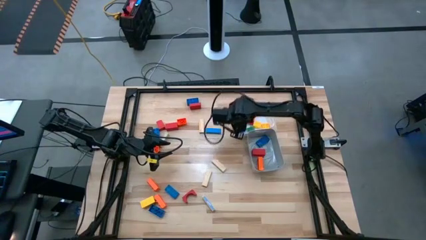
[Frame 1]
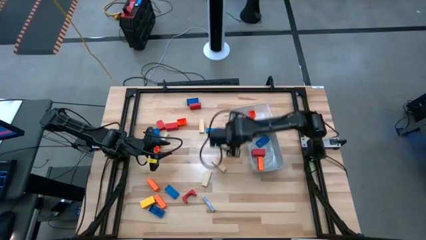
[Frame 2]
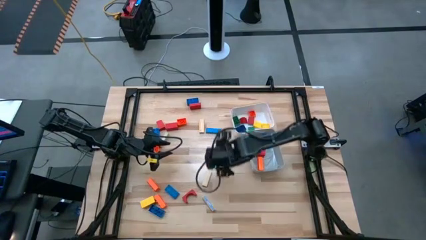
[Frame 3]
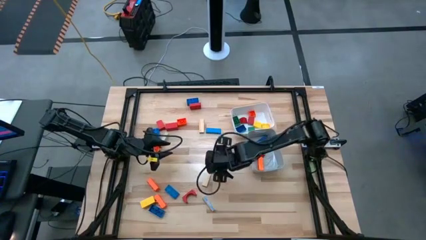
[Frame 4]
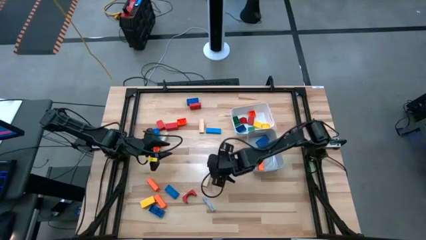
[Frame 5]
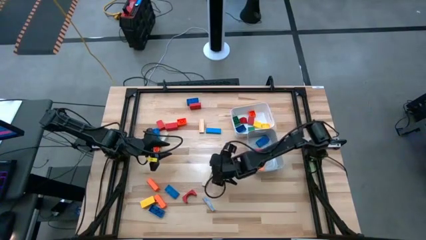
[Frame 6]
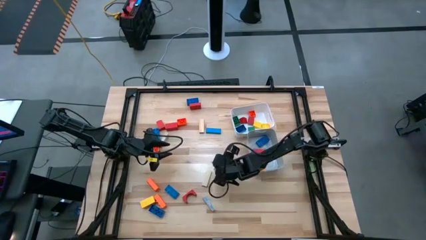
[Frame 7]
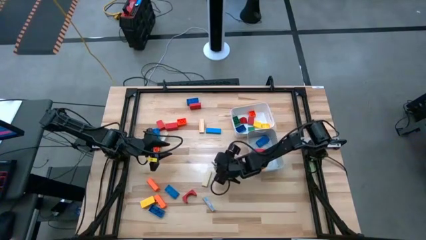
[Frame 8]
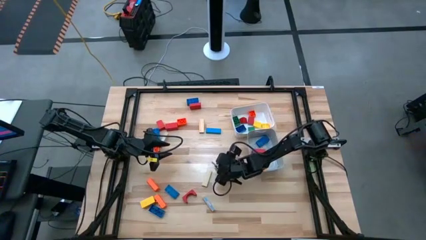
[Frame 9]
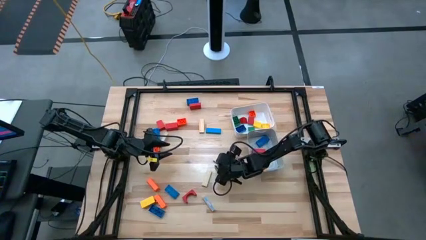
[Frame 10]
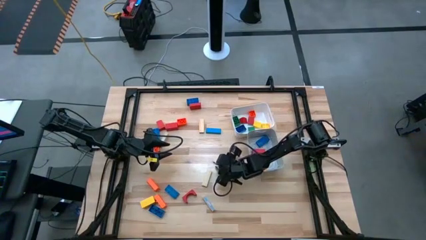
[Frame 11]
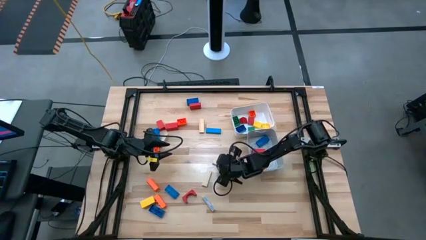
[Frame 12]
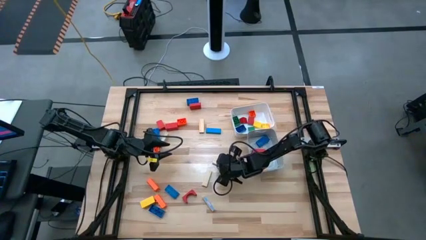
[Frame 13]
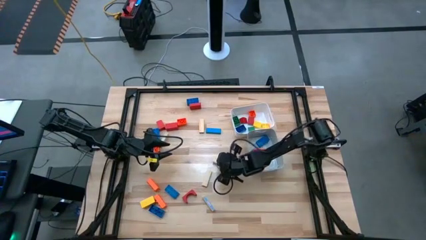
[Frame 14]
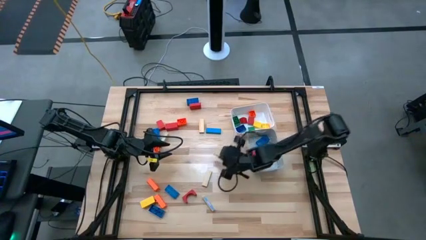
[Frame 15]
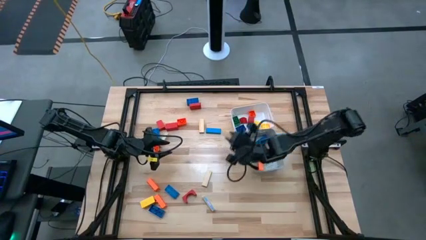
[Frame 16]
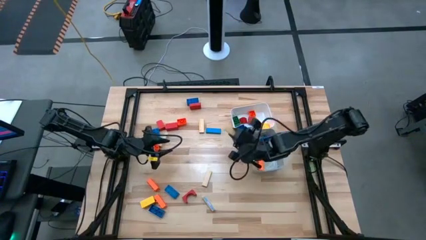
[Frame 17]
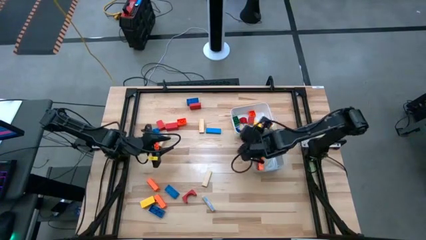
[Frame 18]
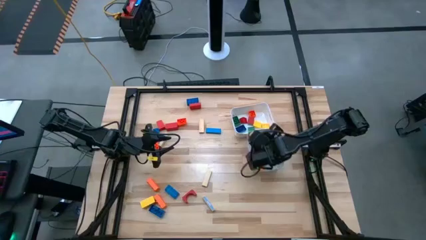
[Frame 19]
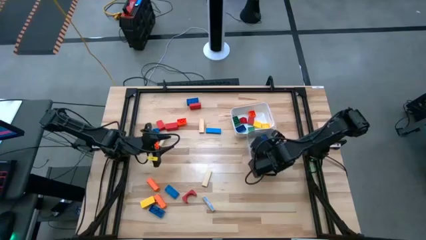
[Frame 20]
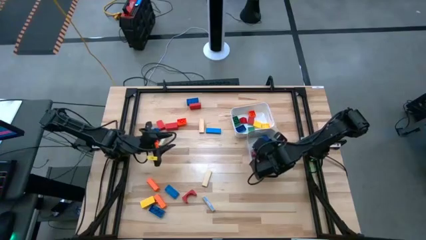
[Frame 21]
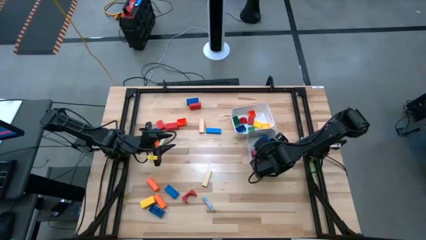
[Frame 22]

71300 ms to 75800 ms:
Task: Sort blocks by size
Put the large brown wooden block into the gray bin

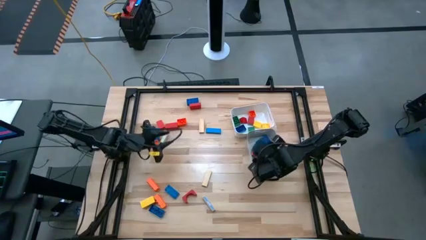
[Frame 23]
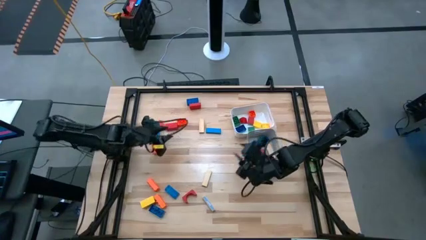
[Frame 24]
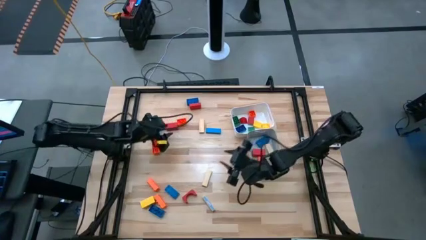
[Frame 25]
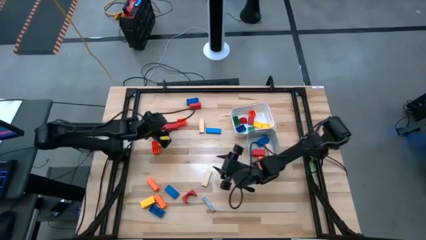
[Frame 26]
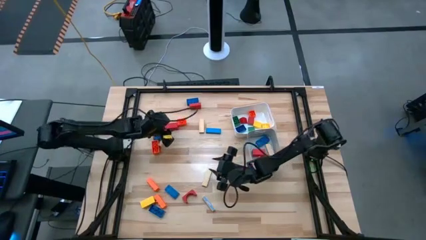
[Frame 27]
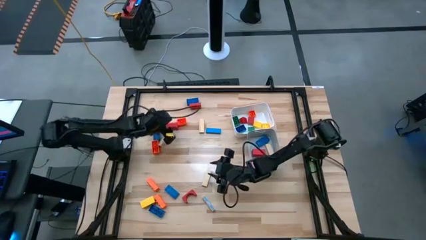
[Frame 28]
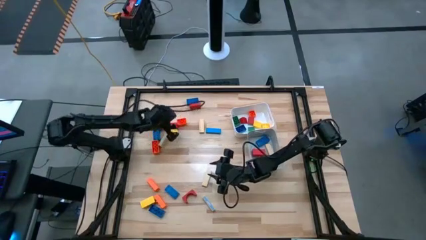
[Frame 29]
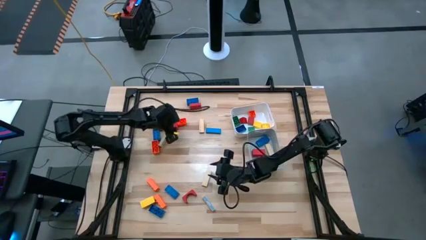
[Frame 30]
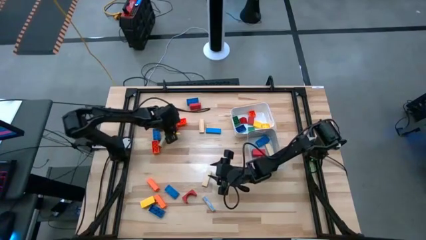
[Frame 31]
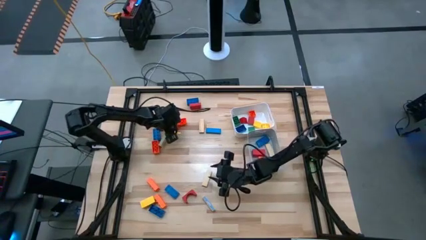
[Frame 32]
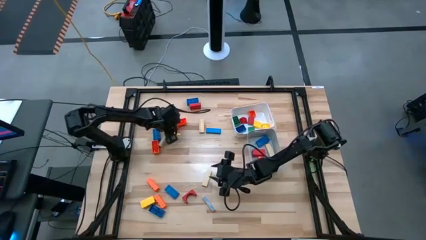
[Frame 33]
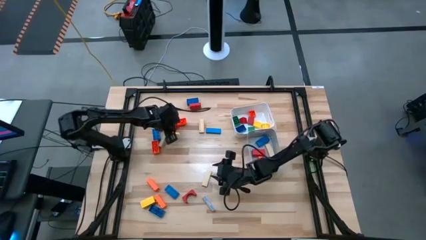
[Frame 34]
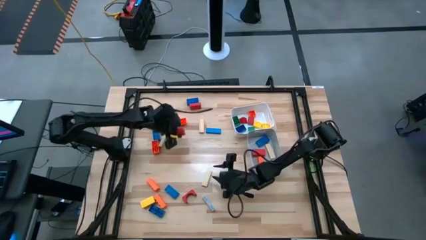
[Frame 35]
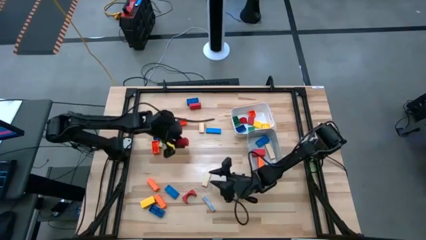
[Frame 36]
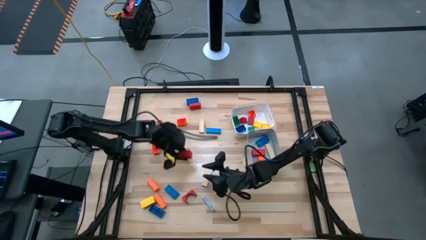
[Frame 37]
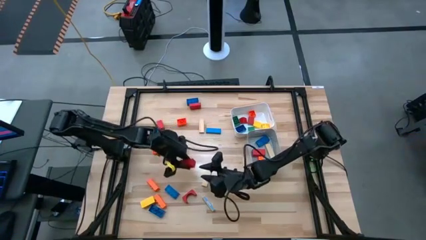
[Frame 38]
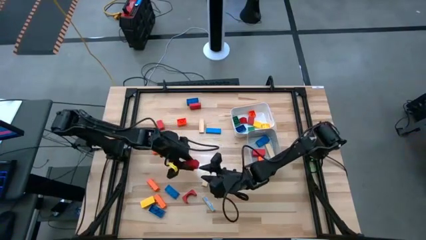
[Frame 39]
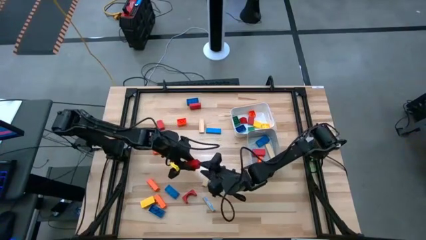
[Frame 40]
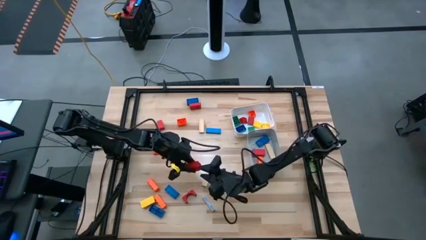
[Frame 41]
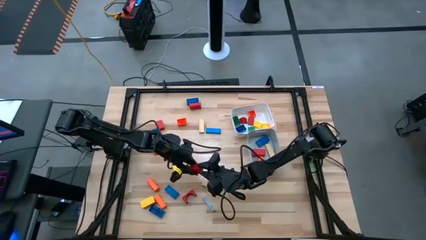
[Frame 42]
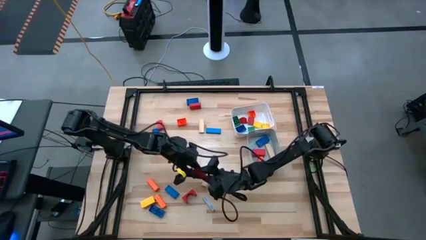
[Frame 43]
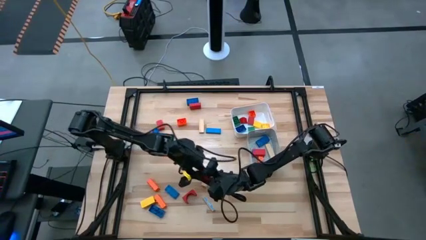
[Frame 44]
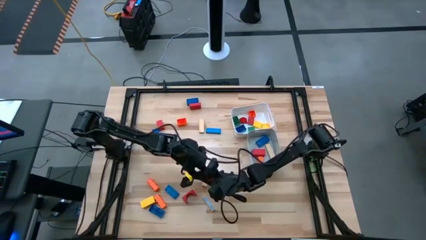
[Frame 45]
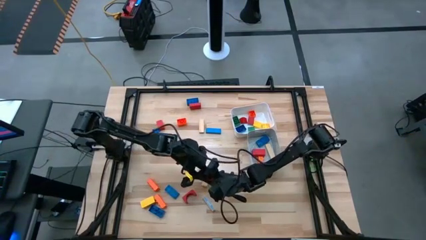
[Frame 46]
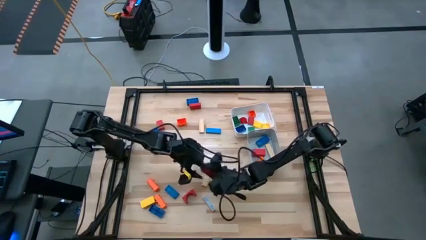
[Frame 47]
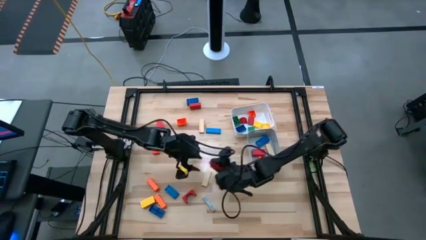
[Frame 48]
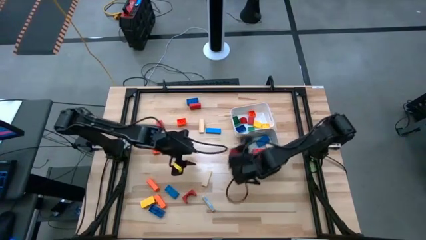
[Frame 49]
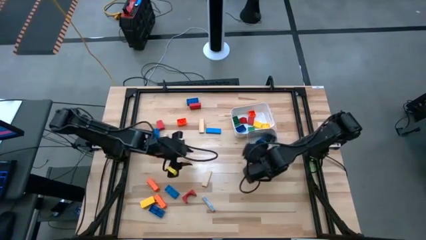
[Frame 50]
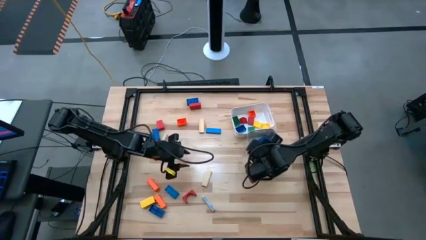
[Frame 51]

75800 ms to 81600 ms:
Put the large red wooden block into the gray bin

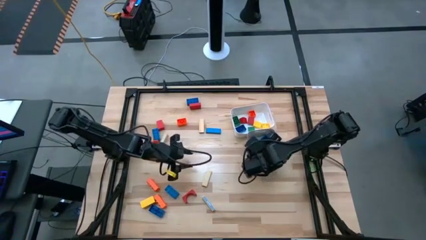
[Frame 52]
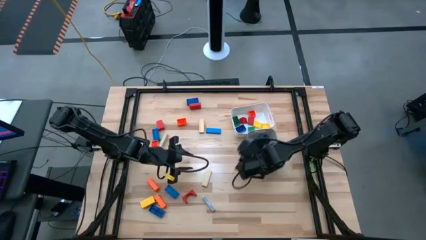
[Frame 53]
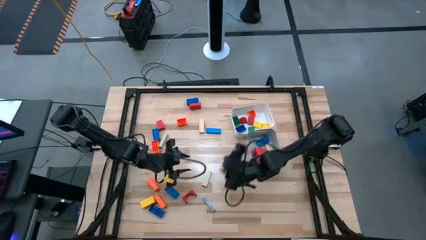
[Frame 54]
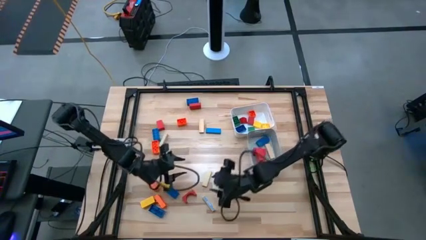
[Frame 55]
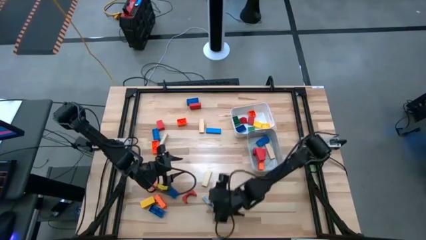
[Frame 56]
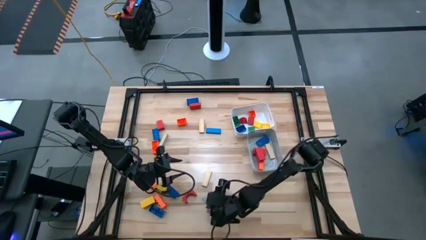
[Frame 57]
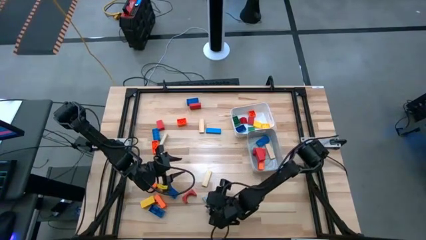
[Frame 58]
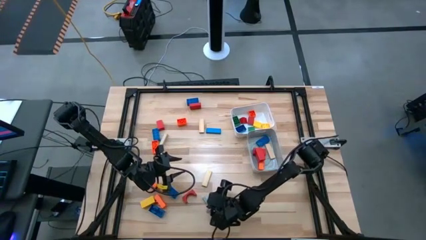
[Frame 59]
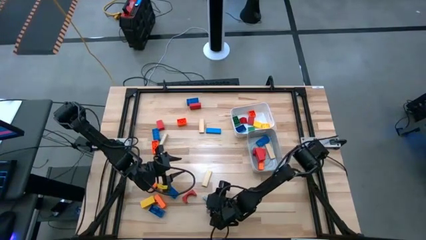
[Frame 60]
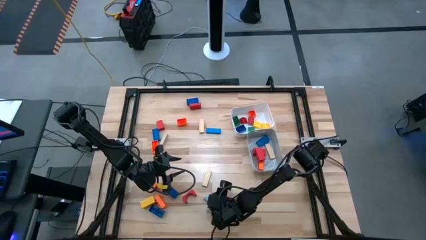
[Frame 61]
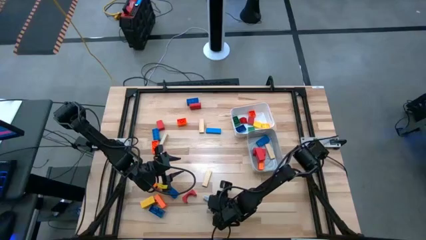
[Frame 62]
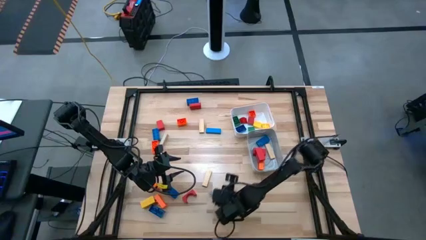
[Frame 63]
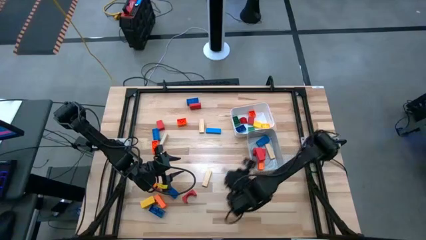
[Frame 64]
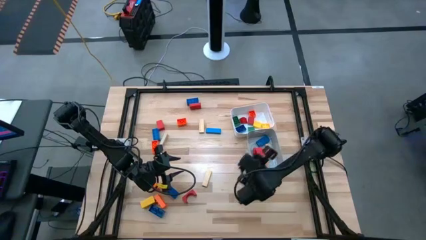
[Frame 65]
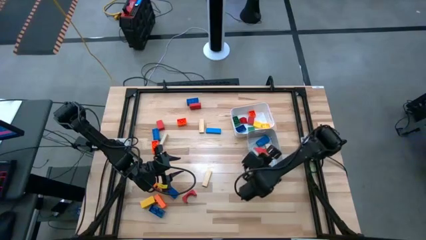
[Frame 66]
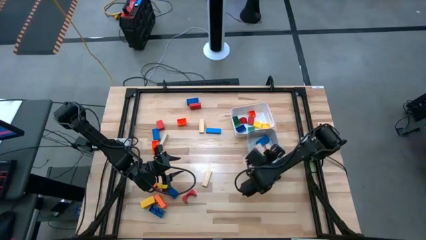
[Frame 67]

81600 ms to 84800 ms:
Put the large brown wooden block into the gray bin

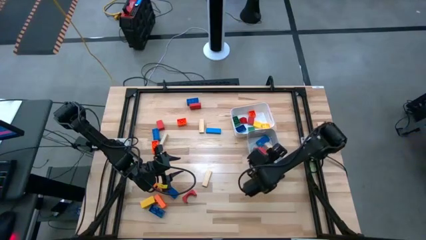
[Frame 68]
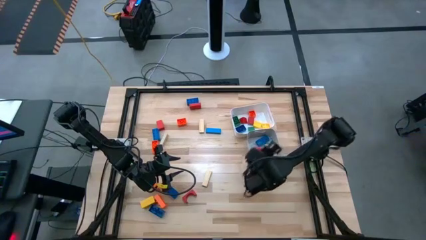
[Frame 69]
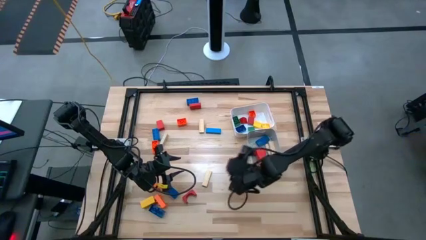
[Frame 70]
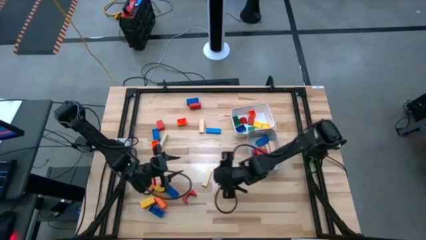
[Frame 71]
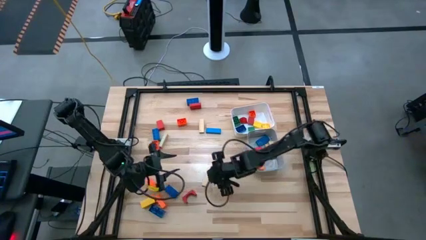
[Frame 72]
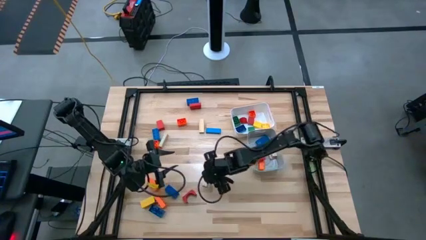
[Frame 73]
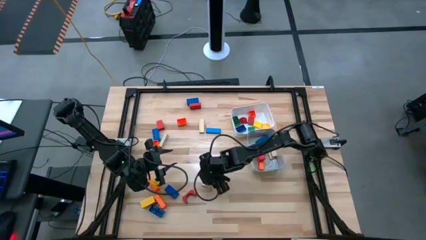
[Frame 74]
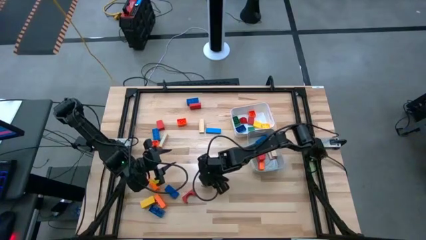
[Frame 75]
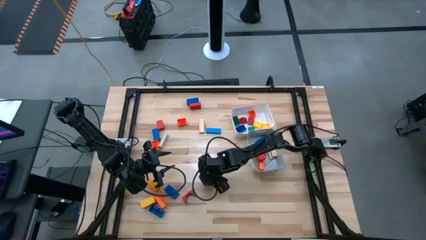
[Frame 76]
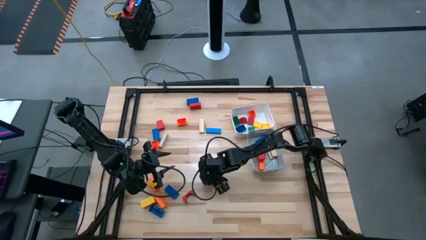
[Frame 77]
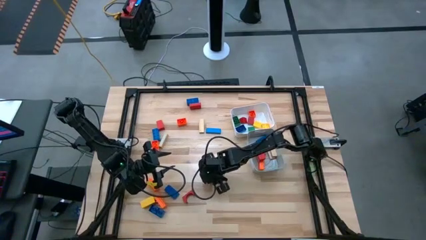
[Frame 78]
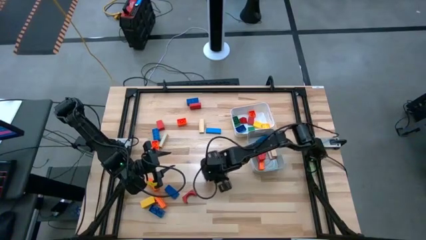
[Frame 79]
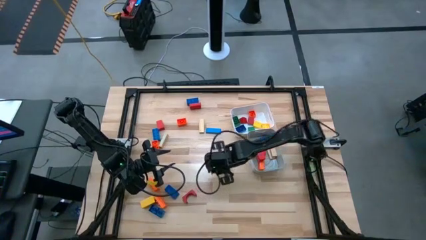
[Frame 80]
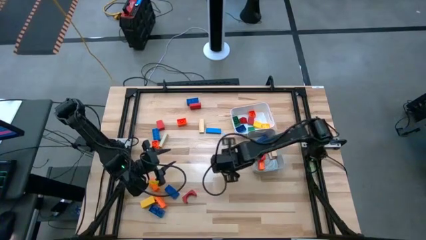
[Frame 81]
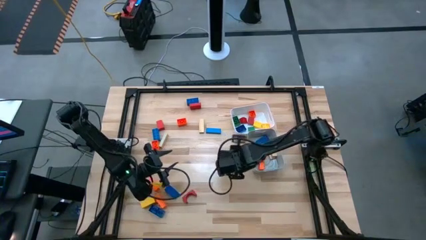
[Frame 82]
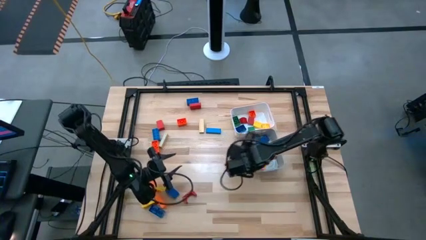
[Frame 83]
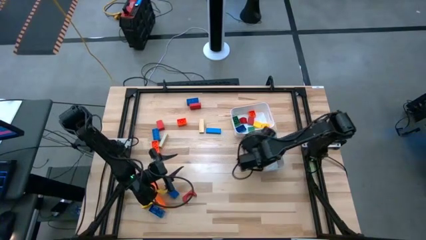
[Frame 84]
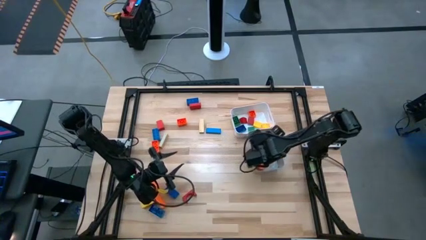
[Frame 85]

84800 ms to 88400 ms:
Put the large brown wooden block into the gray bin
